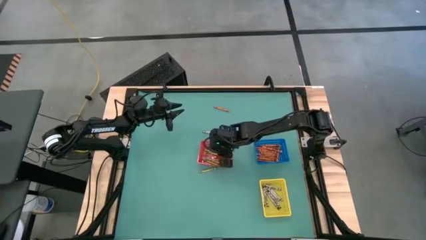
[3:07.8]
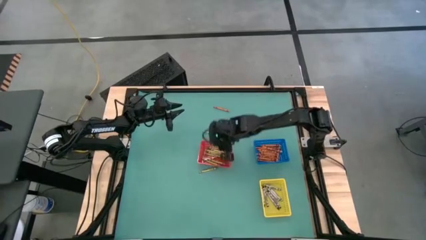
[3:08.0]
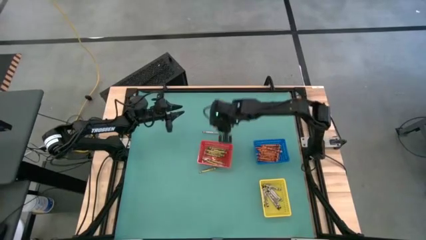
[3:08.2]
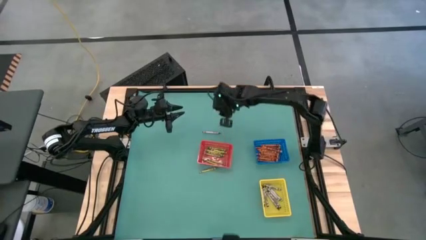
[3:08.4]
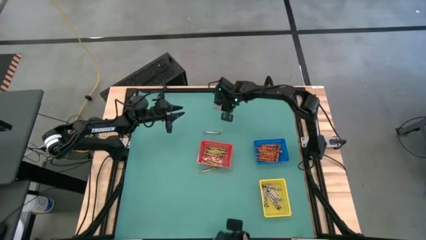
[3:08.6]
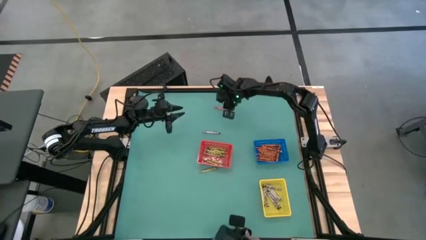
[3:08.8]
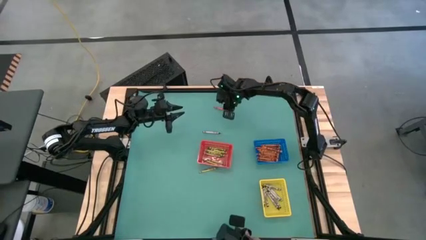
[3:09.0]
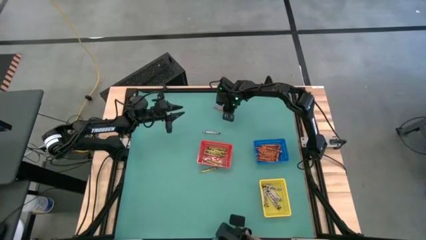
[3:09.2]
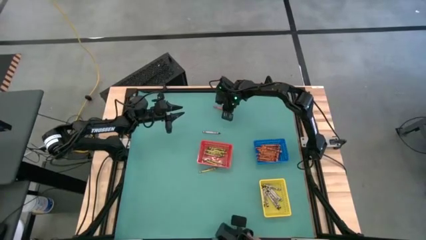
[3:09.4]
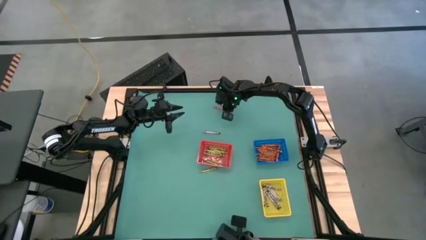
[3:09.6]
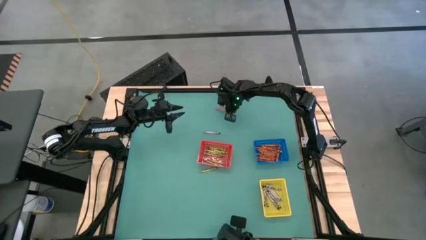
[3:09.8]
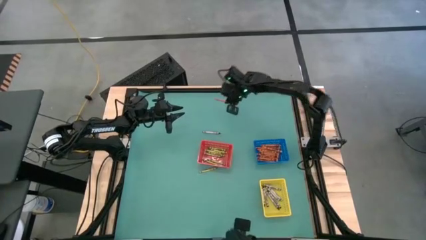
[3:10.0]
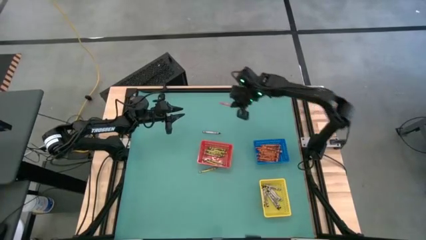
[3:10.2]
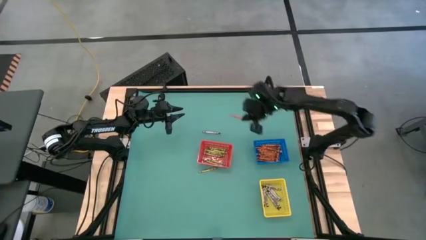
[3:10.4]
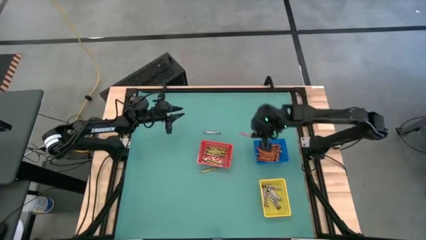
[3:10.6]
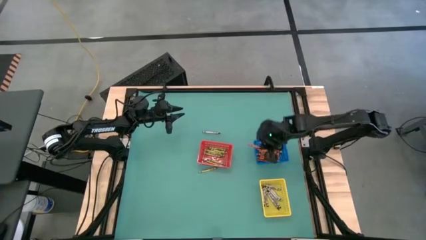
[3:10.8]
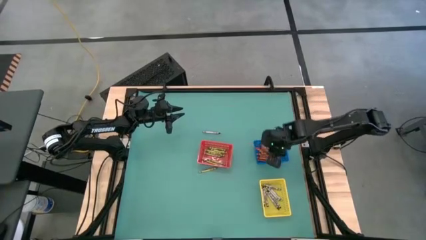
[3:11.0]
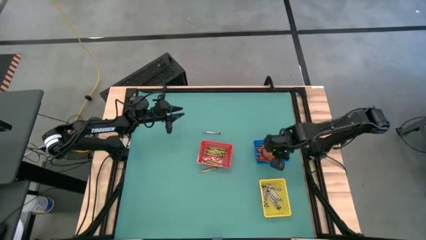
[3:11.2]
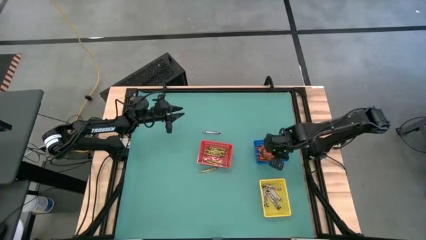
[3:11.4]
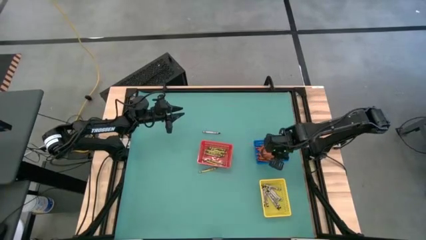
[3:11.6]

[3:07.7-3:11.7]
Task: Sort crayons
Put the orange crayon into the blue basket

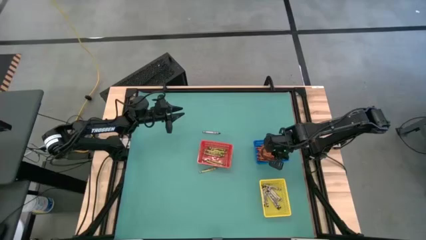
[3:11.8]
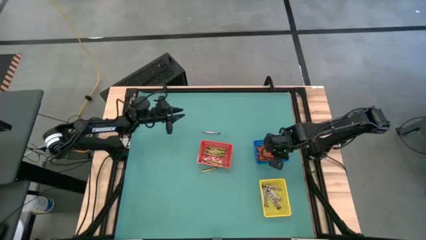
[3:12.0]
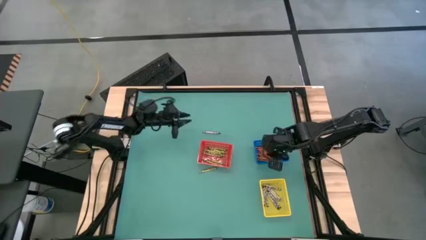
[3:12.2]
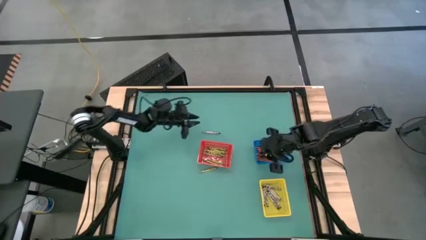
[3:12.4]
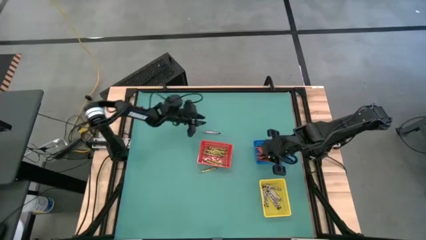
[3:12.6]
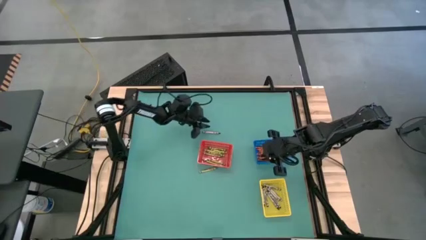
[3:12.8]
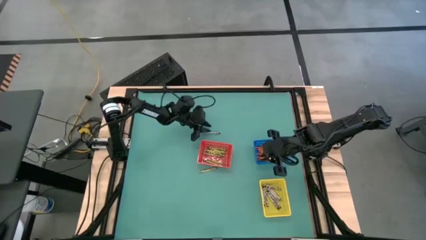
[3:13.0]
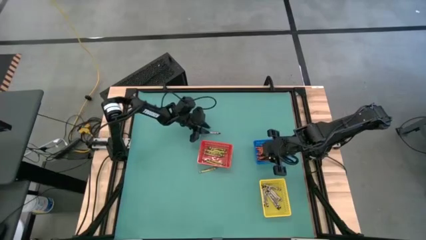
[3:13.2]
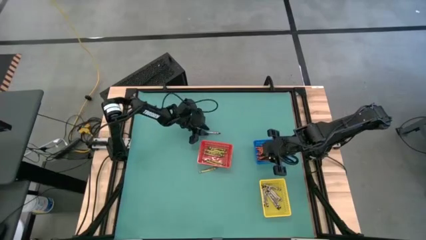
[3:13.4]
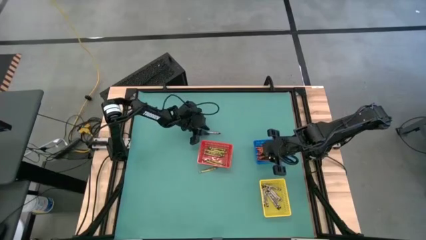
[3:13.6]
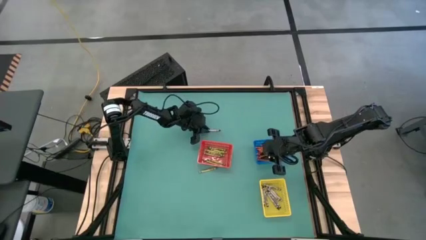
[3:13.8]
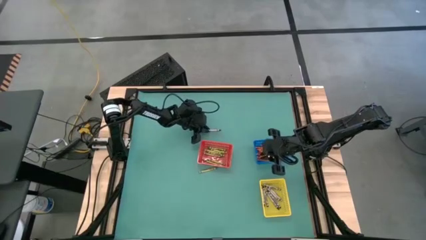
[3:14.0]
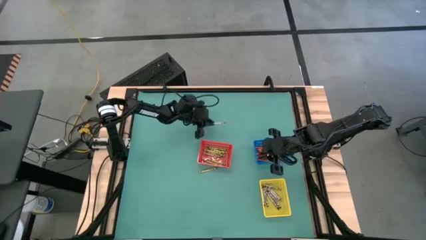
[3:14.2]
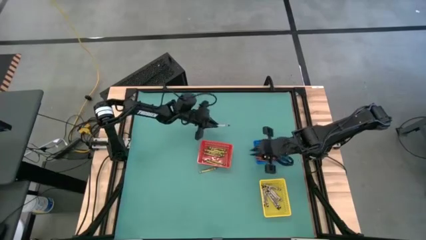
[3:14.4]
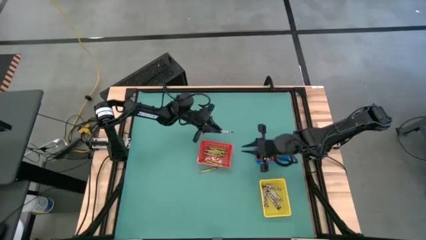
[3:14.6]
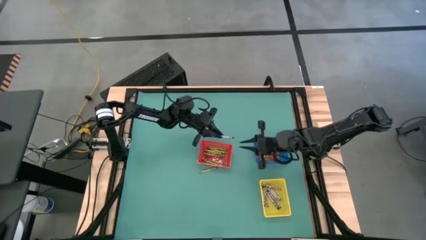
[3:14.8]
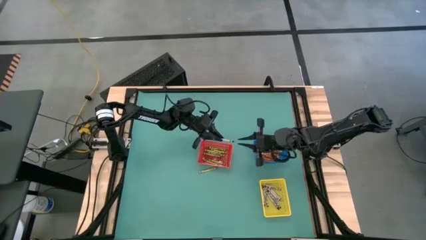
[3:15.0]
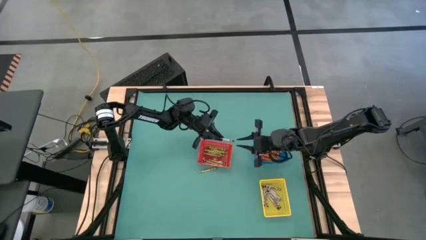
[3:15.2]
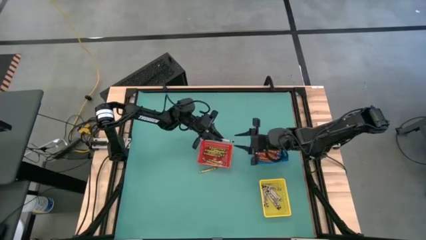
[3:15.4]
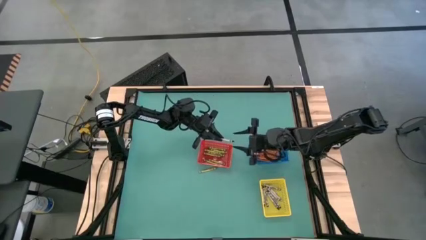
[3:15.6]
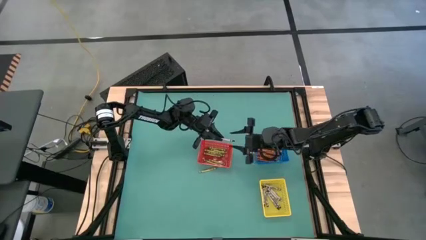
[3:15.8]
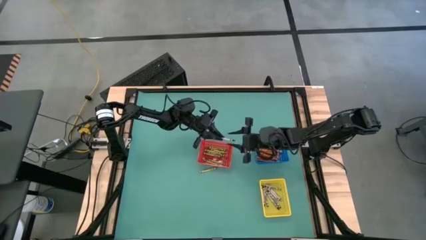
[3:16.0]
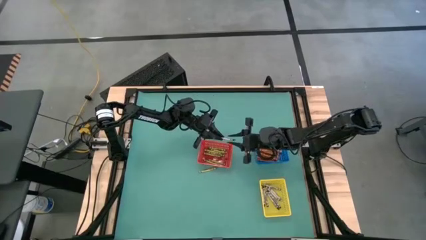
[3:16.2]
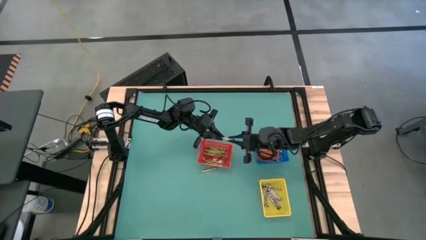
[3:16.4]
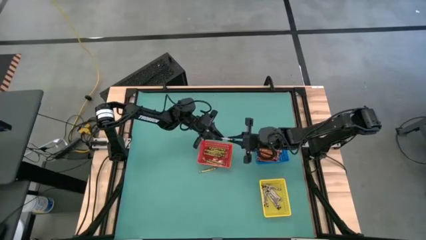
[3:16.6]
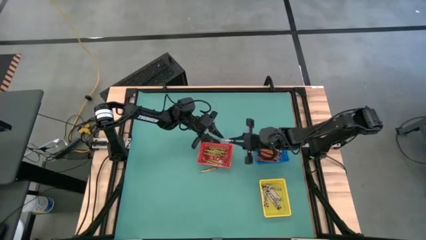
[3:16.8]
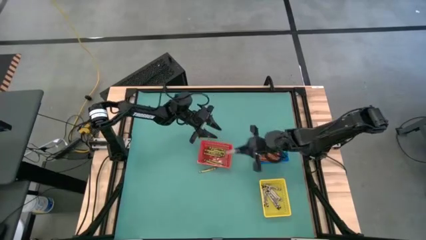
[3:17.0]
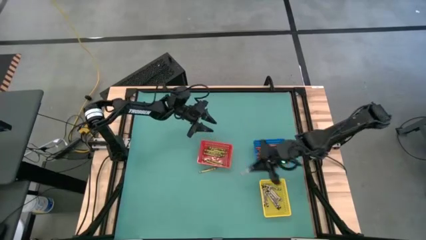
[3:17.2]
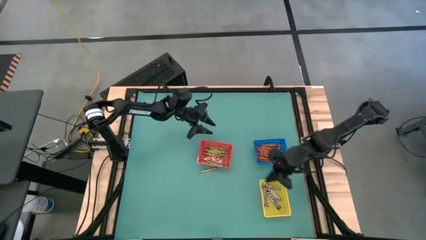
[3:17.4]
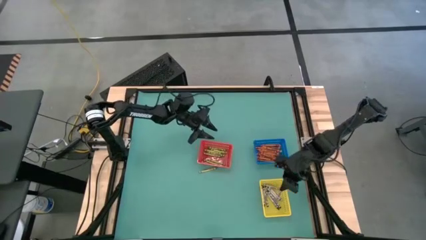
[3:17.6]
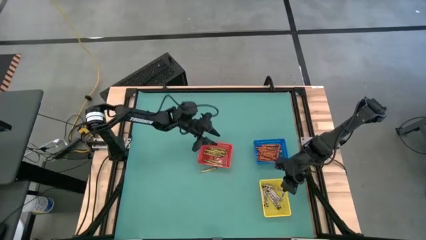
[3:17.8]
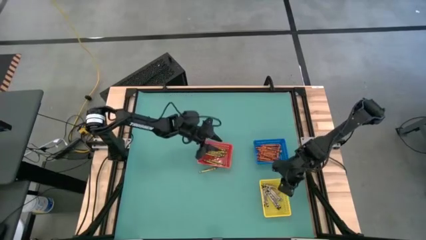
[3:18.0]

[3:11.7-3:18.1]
Put the black crayon into the yellow basket

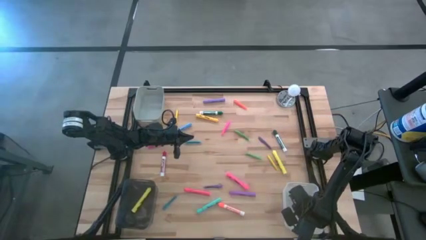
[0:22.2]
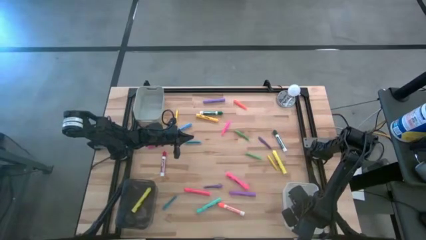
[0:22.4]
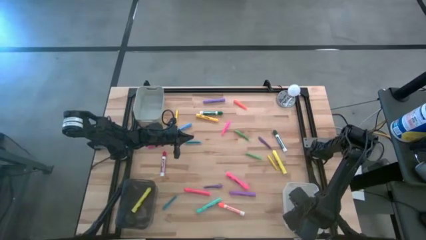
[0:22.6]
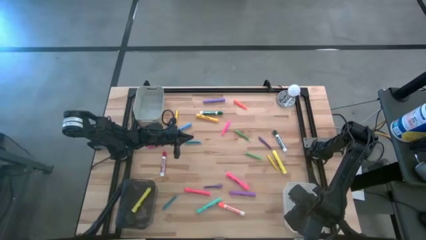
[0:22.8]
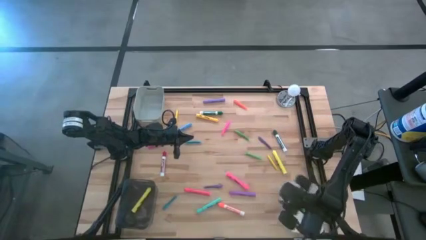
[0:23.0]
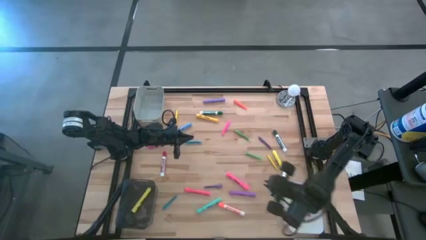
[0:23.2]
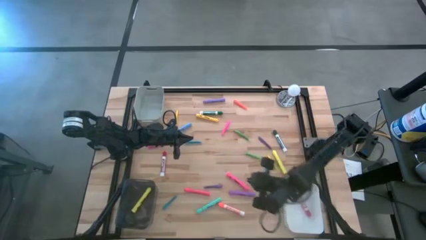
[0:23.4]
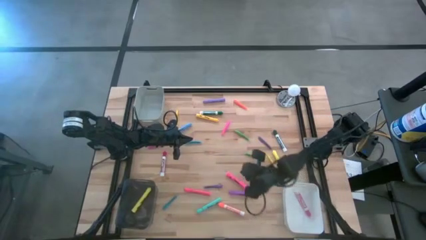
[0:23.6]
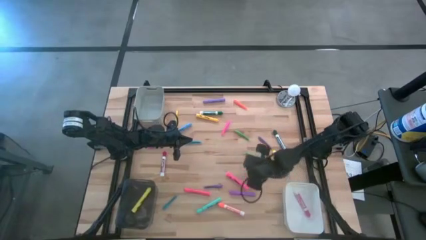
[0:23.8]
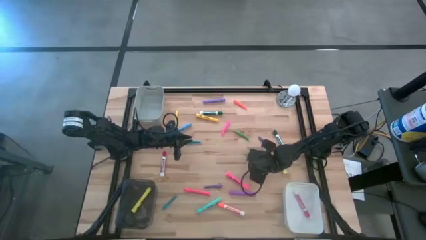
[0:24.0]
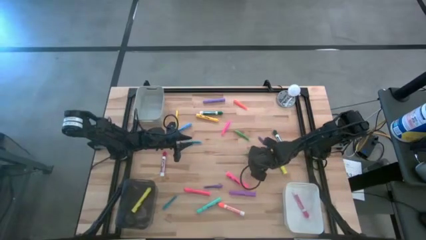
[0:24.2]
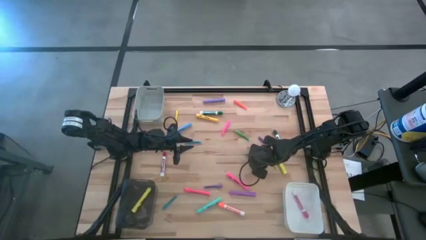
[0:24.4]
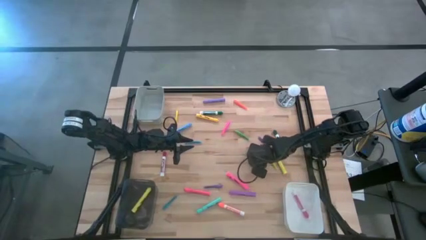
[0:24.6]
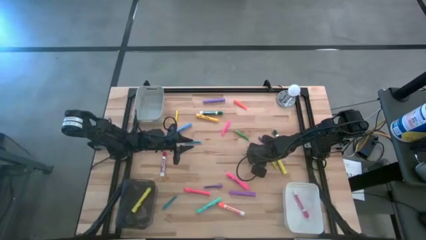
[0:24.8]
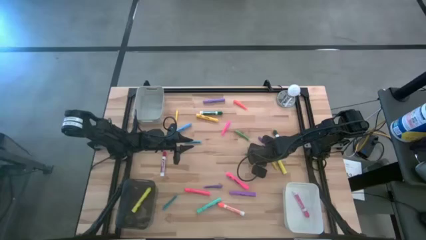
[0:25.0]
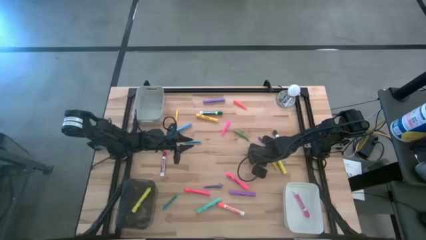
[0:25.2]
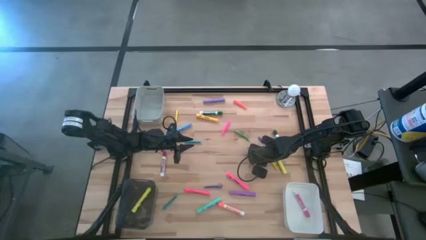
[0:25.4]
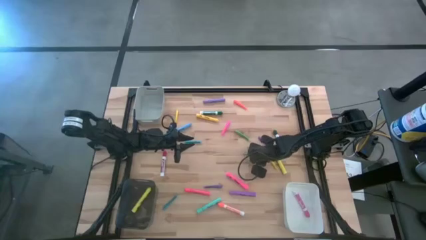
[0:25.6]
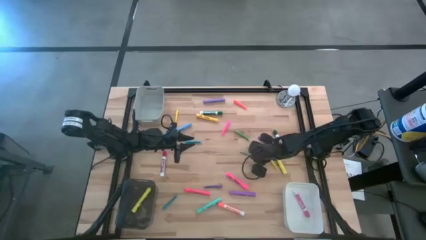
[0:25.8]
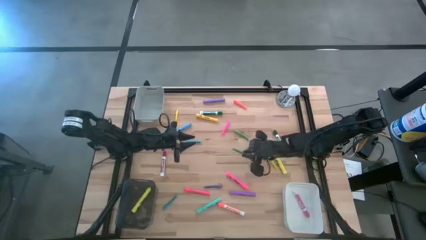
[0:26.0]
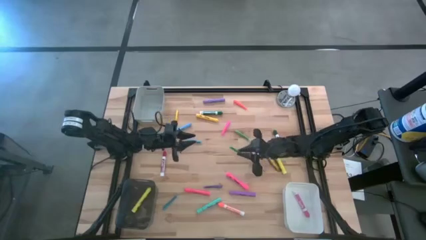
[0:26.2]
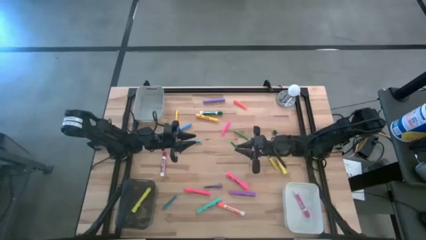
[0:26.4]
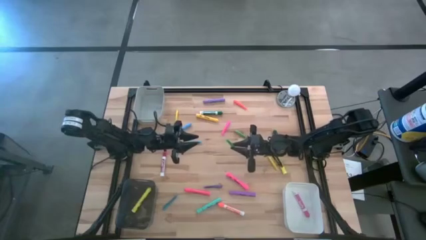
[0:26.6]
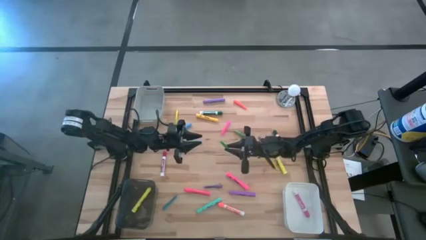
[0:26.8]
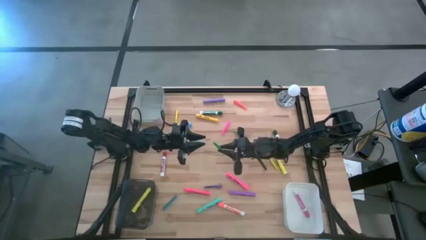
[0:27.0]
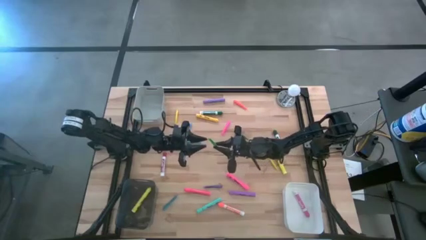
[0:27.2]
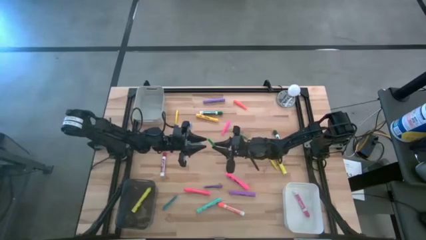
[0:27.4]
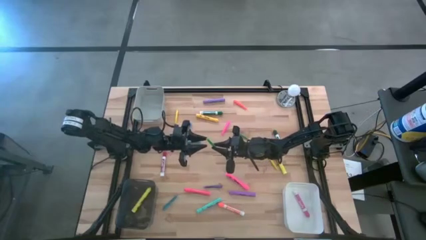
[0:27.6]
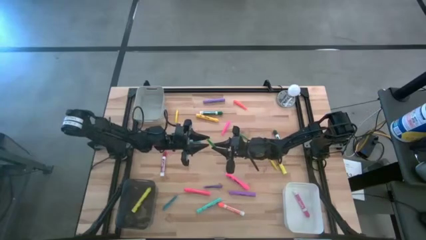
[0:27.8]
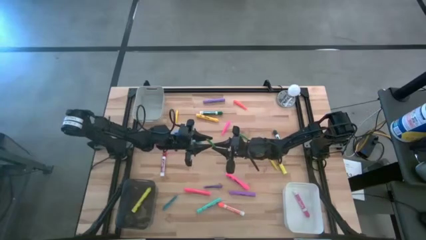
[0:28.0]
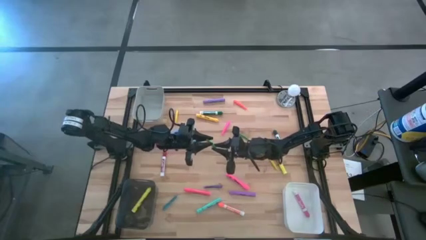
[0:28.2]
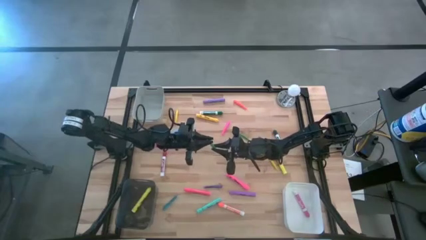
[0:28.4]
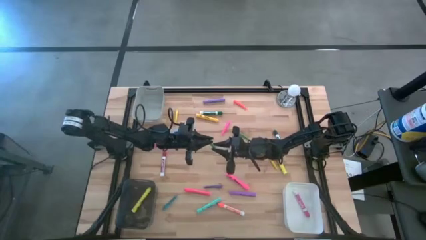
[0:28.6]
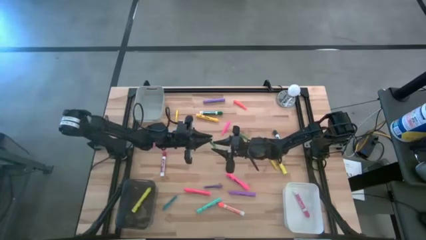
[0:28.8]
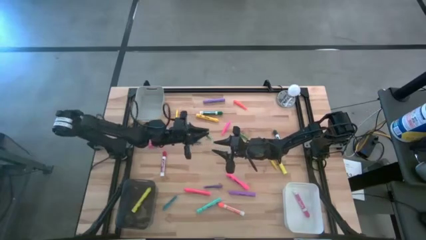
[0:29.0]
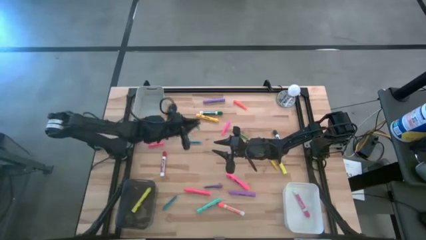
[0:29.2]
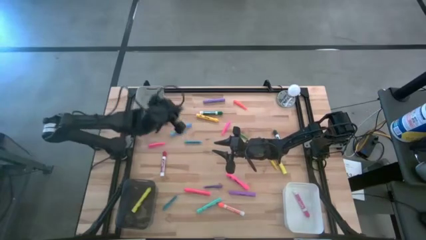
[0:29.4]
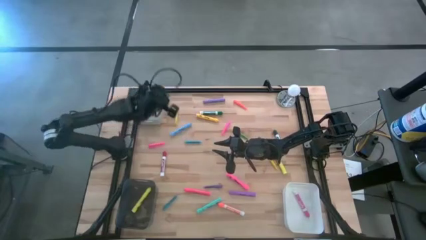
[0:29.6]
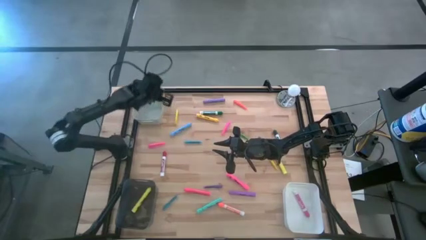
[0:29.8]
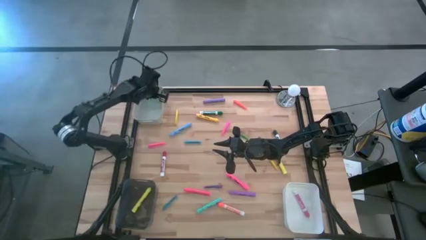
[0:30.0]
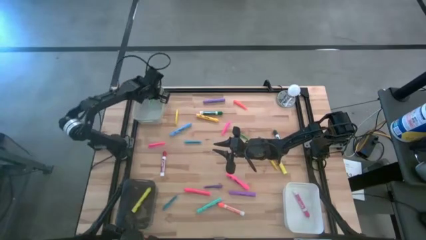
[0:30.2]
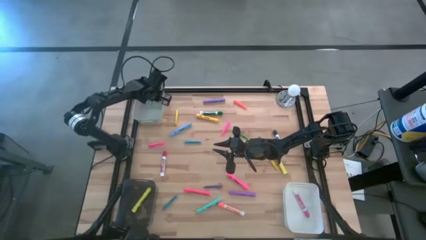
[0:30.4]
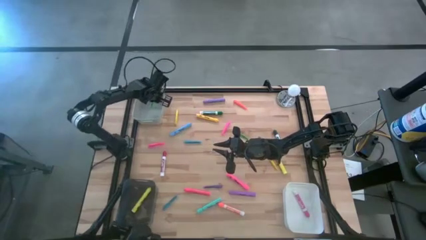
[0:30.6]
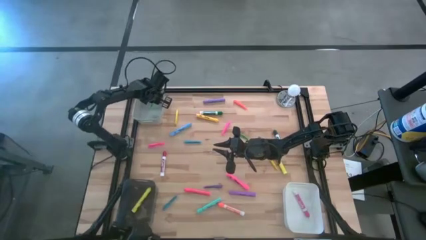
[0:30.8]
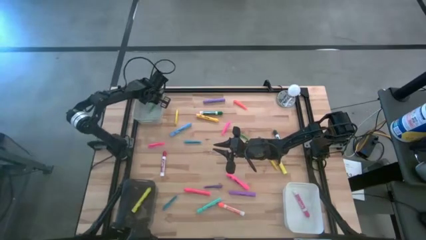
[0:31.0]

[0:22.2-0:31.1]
Task: Pick & Place Markers
Put the bottom green pen into the gray bin
